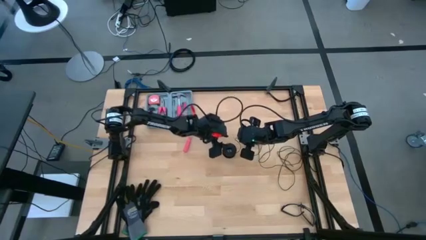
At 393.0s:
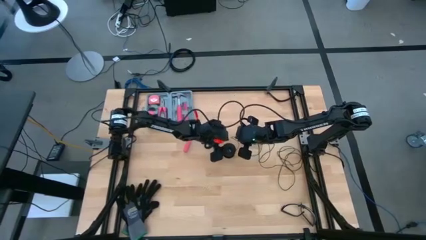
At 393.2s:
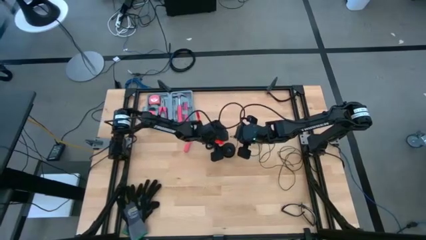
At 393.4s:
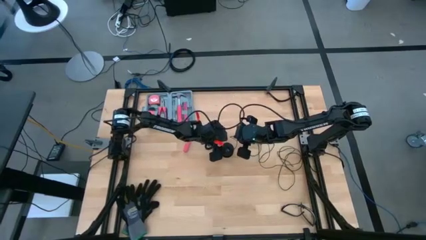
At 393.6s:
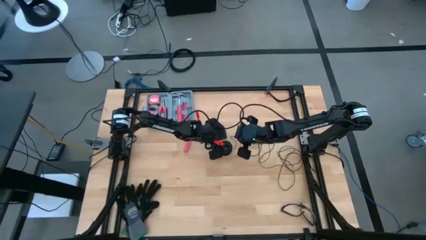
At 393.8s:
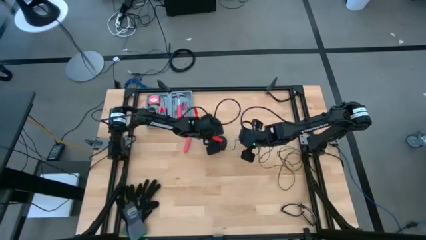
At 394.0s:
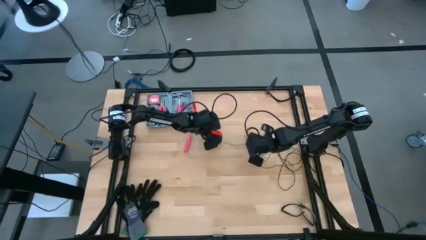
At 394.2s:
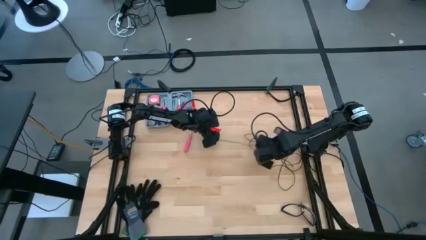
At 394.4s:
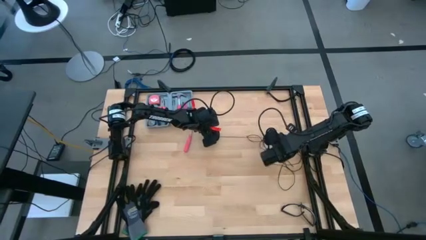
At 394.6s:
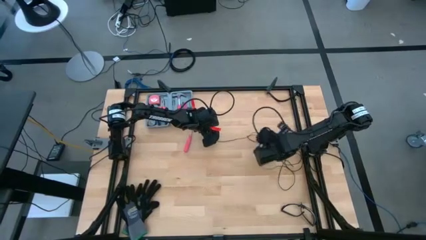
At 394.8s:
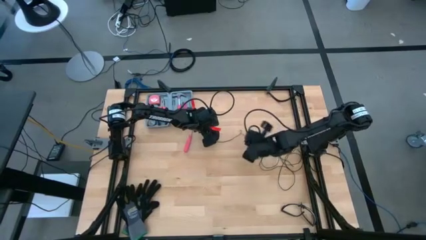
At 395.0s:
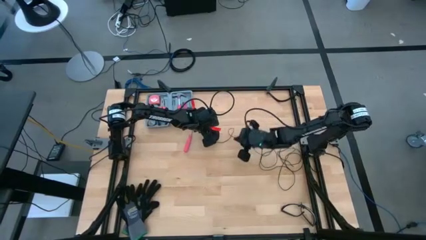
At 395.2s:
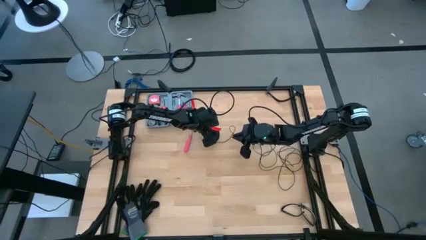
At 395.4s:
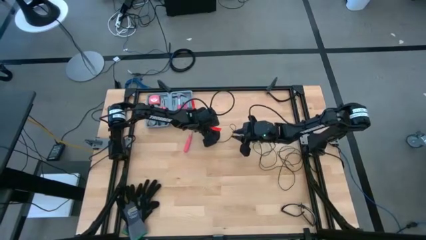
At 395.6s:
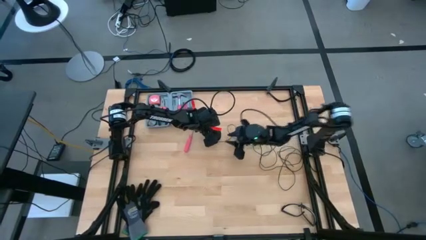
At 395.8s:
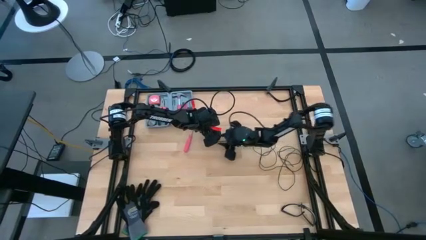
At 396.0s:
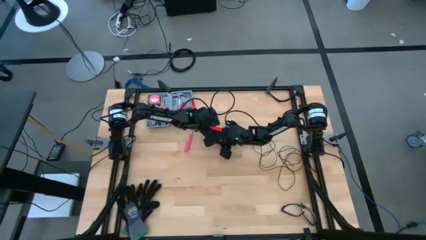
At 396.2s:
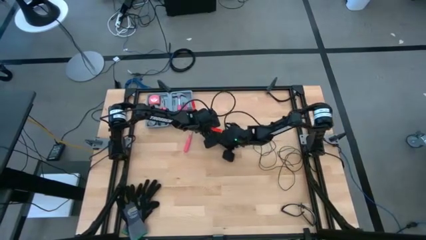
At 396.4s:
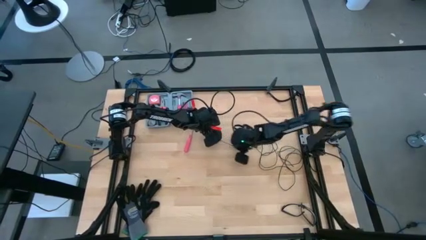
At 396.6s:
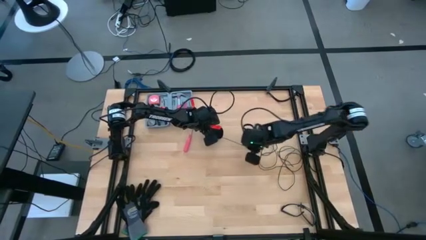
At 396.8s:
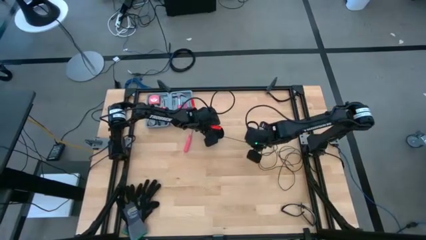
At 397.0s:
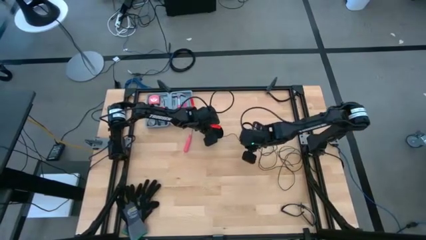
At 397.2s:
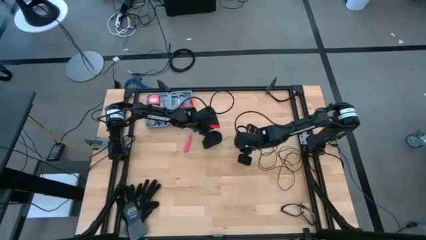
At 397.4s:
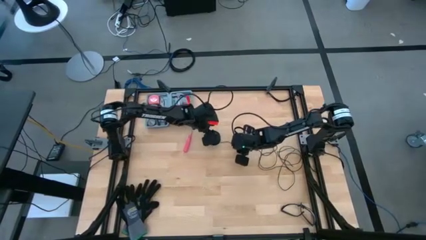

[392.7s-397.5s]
Task: Coil cords
Uncoil the black wire from the spool

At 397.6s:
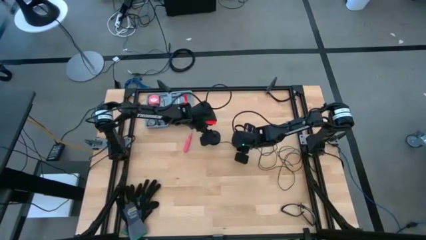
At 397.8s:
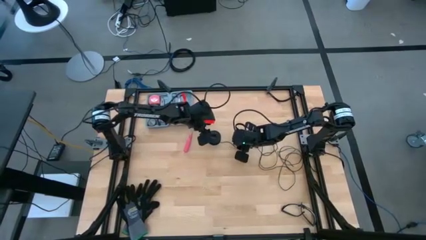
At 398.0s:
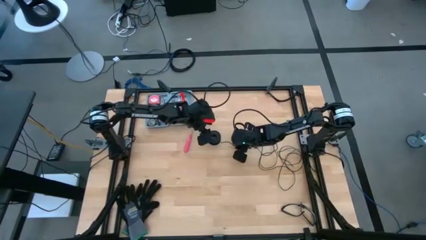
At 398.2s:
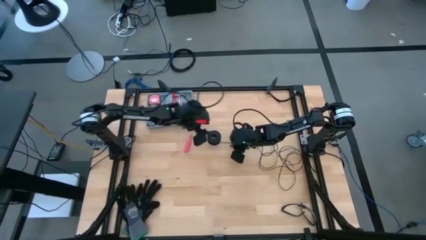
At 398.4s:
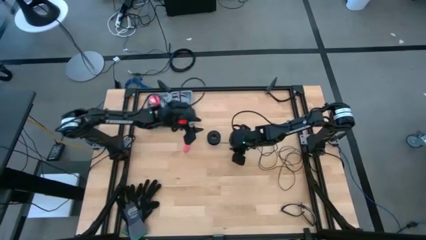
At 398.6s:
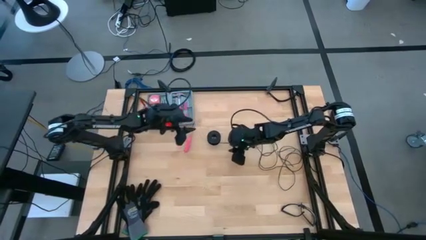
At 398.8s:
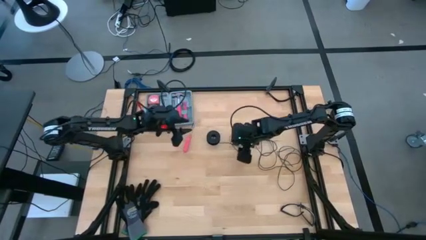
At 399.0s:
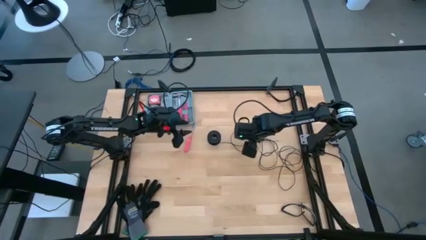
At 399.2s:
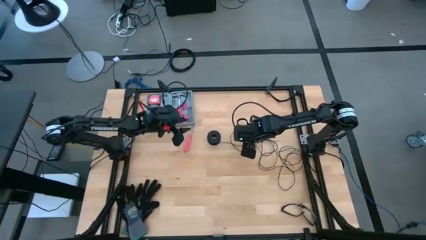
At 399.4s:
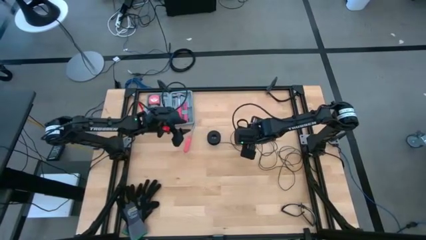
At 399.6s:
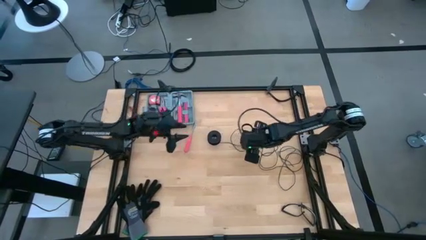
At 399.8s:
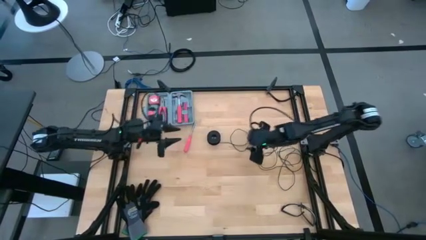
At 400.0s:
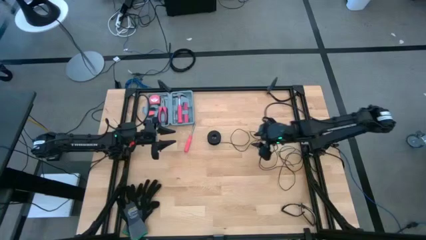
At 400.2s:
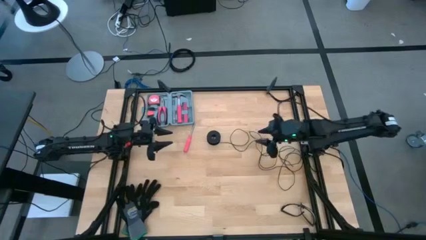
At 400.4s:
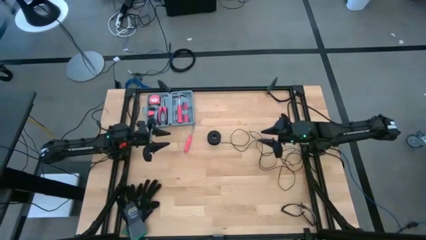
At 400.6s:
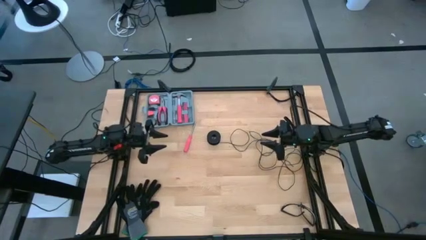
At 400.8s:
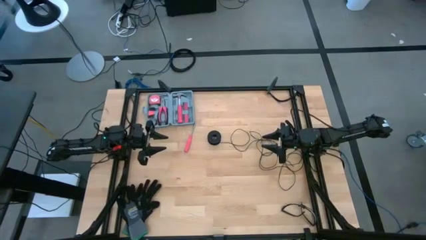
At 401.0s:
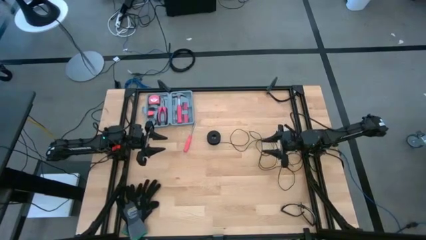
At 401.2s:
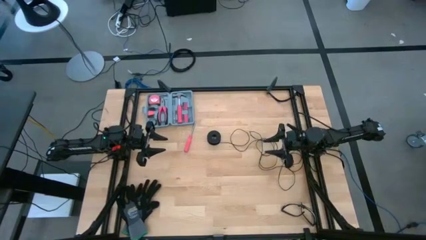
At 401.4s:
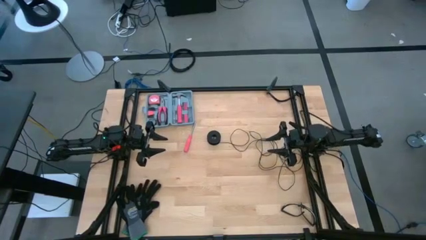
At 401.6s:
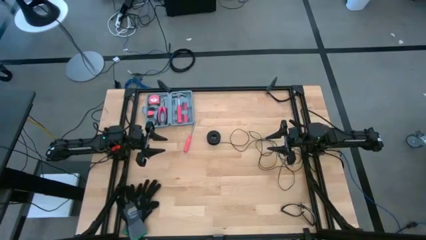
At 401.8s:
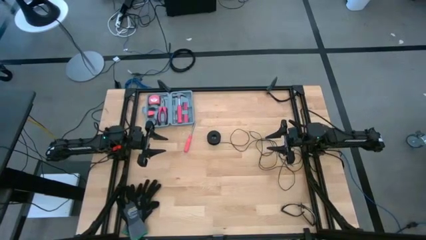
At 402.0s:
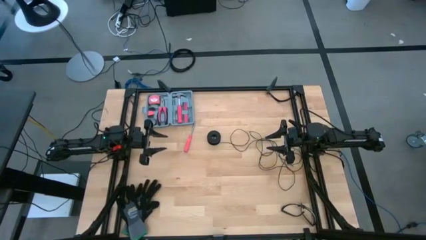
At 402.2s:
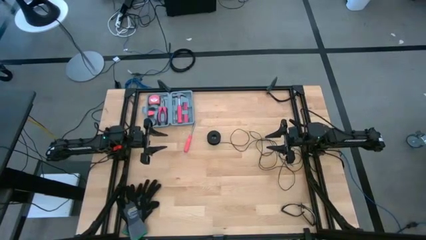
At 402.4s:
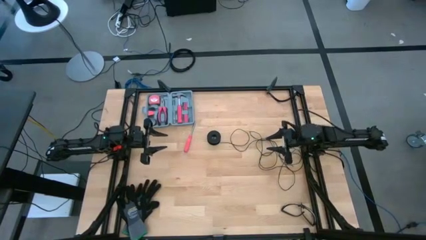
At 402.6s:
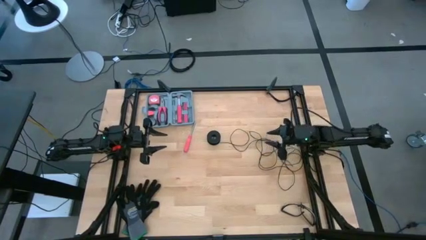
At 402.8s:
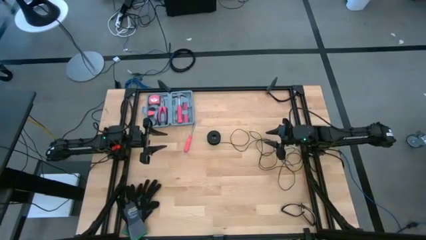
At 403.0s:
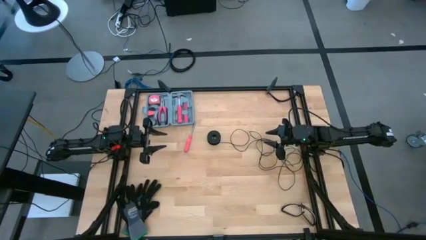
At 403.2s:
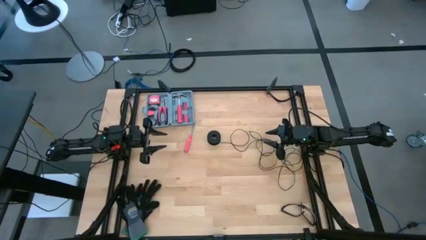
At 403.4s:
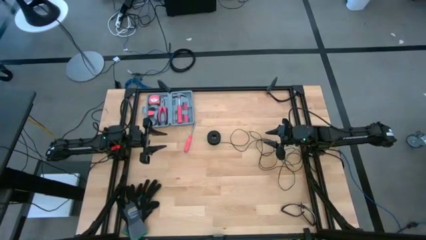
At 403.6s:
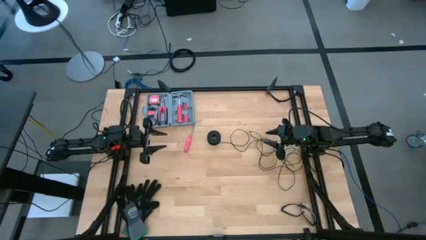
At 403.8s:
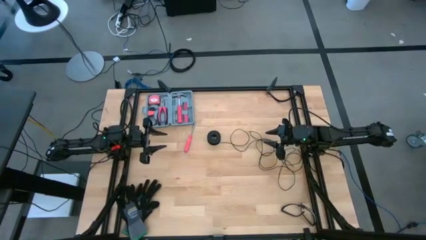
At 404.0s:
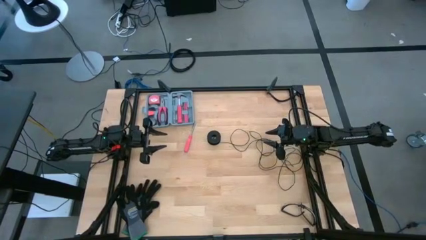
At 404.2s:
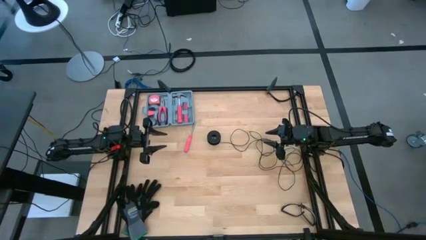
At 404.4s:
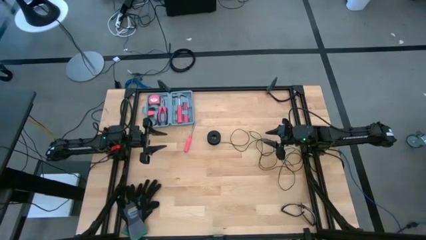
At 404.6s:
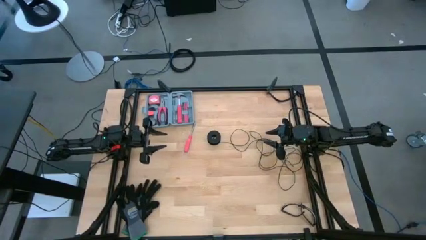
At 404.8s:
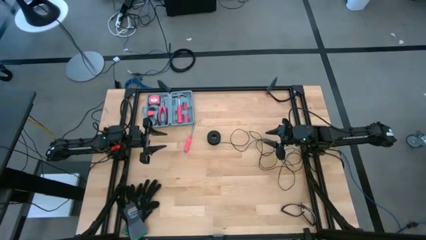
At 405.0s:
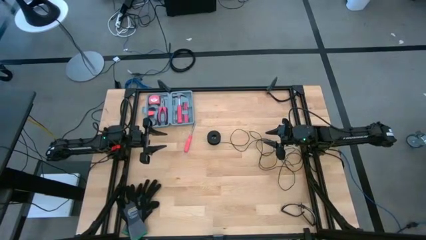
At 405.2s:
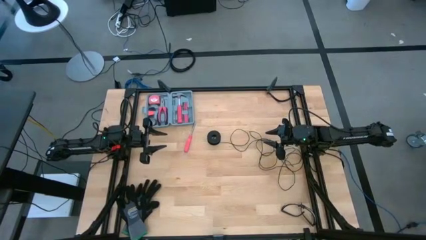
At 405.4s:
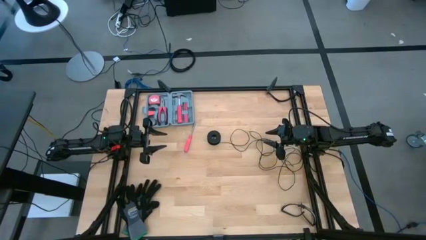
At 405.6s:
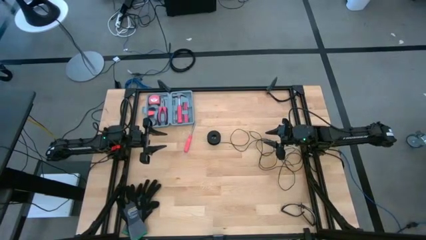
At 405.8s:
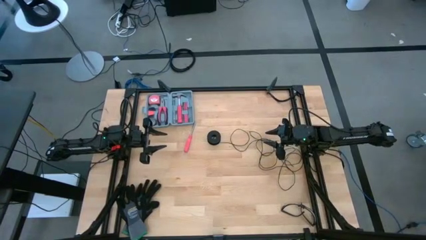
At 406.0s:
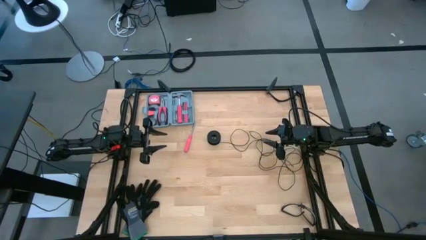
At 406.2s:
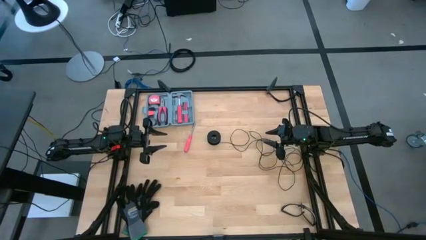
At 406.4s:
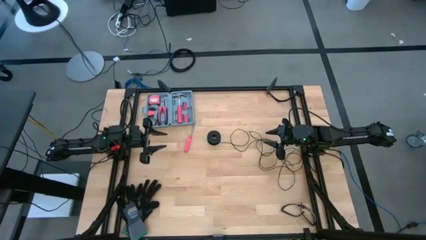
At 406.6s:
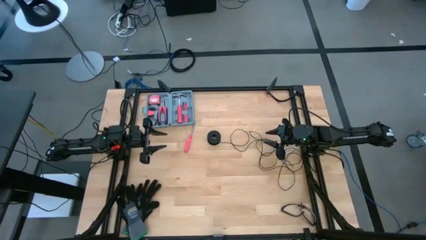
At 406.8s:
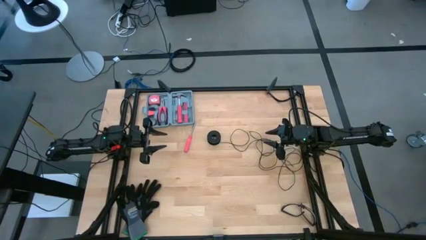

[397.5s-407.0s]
Return to Home Position

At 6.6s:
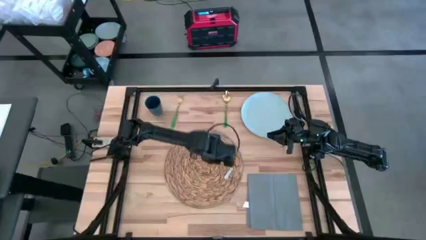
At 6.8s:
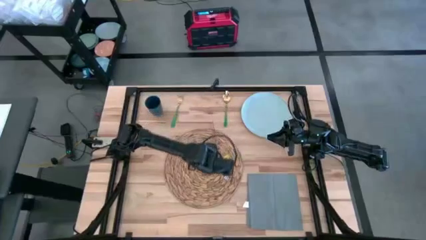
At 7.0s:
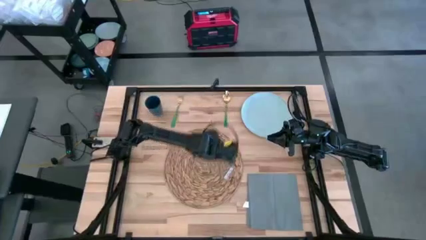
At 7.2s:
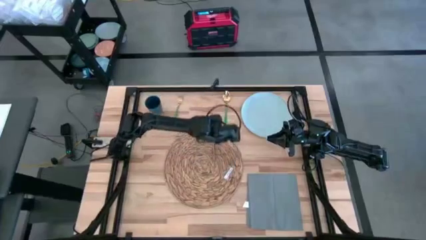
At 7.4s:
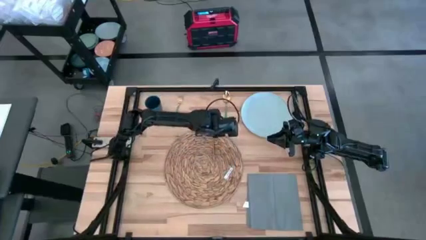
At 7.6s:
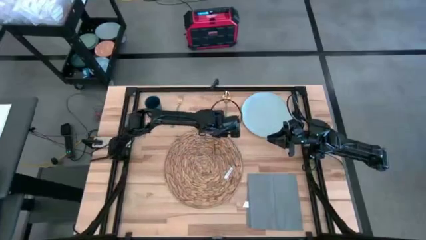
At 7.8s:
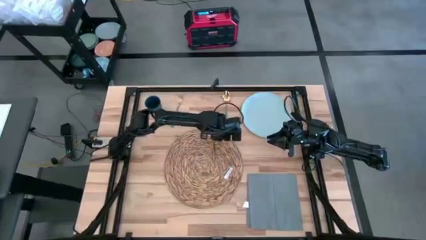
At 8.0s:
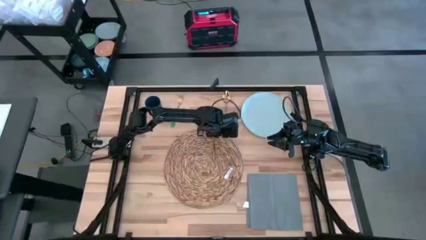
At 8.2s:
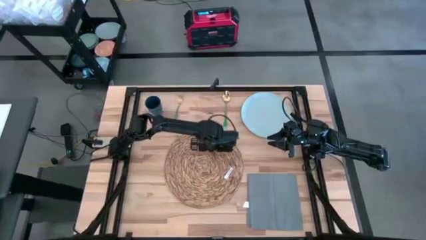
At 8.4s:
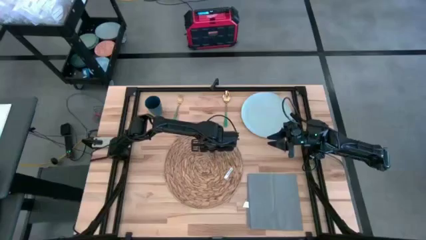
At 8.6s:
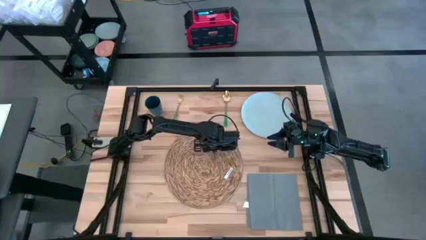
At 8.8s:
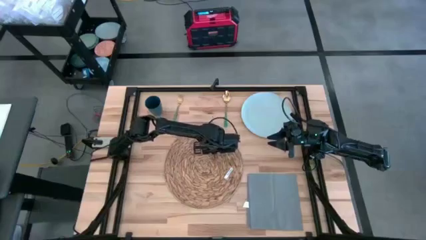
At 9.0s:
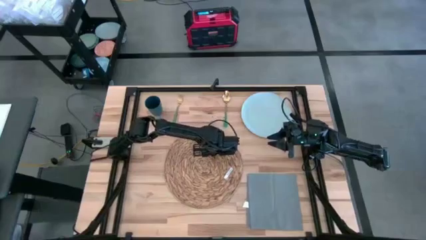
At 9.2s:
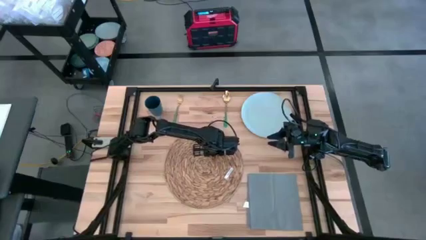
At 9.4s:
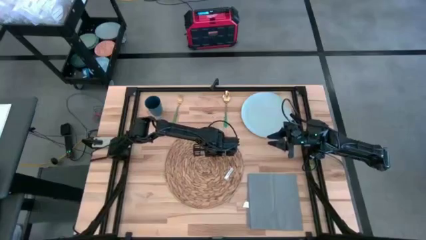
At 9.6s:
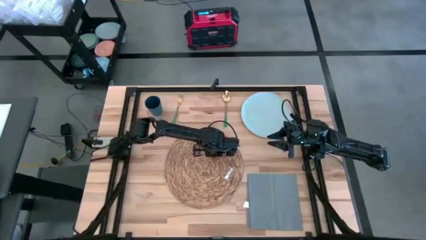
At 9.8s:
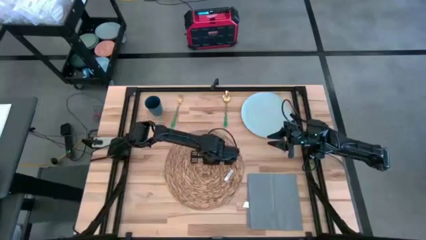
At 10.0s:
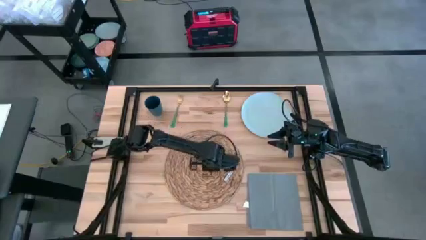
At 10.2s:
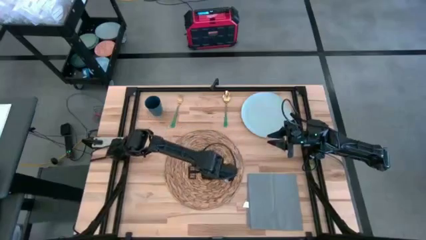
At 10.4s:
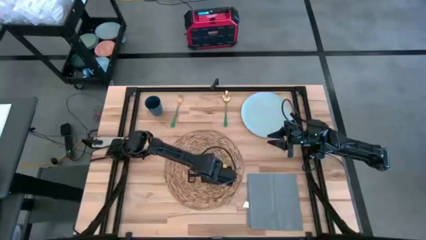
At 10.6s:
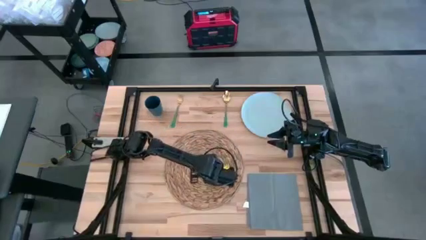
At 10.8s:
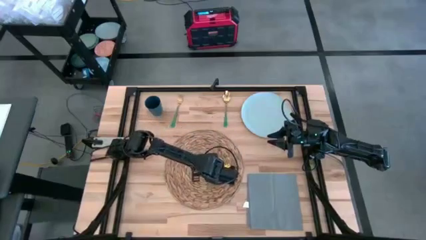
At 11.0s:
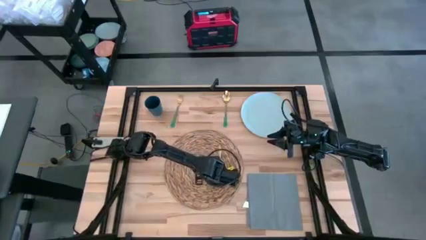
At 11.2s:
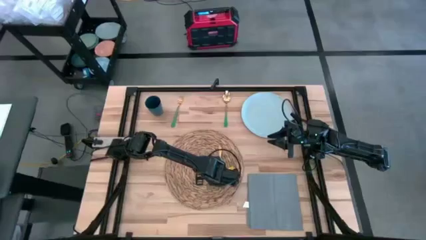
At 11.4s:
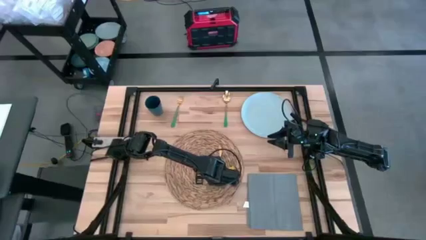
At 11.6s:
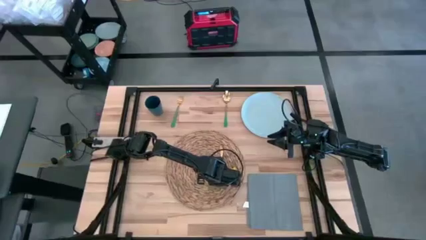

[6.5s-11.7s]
Task: Set table place
Put the gold table knife on the brown placemat
